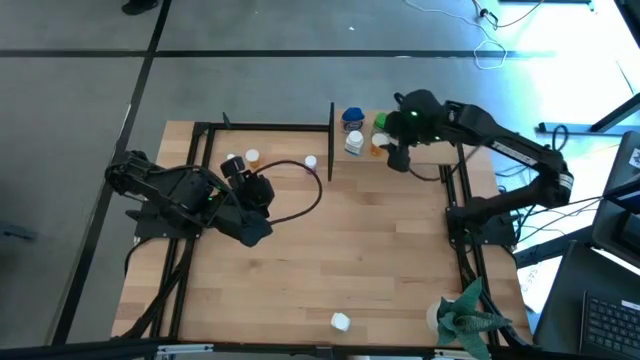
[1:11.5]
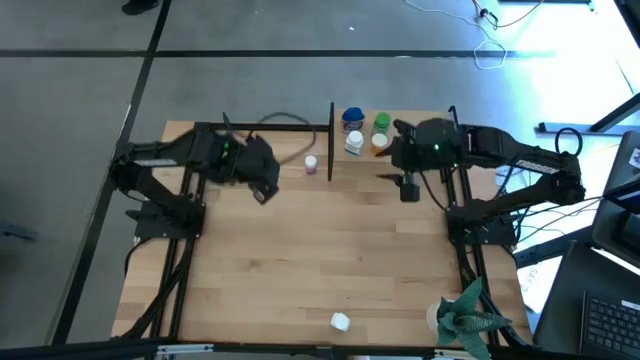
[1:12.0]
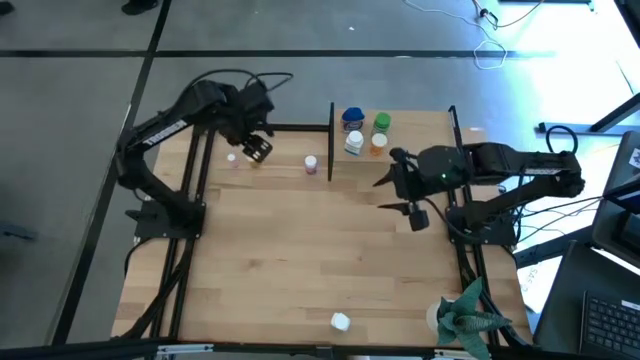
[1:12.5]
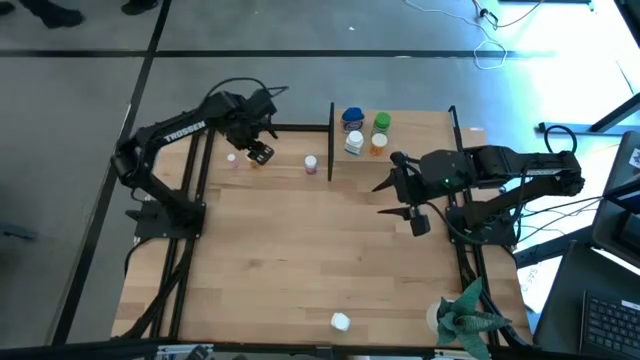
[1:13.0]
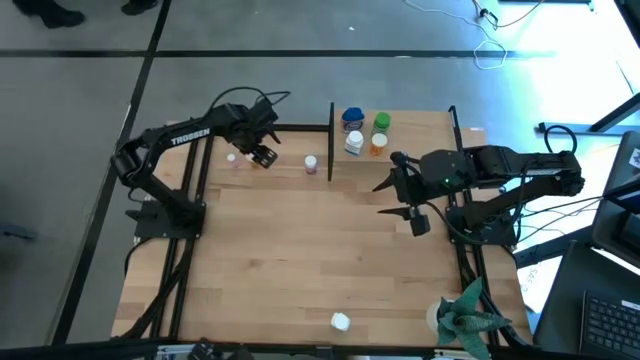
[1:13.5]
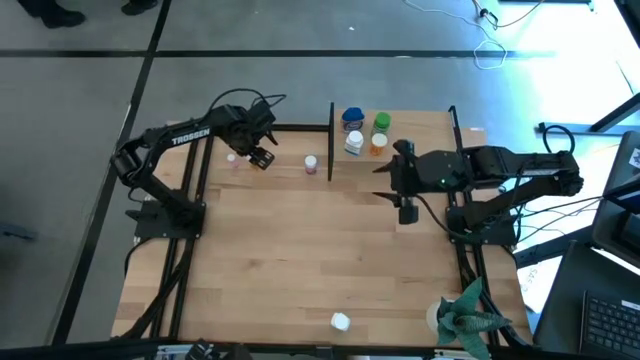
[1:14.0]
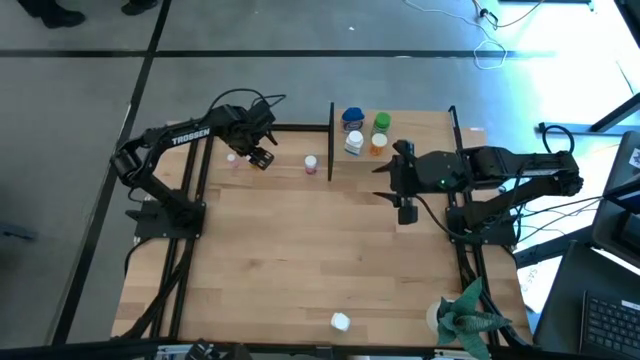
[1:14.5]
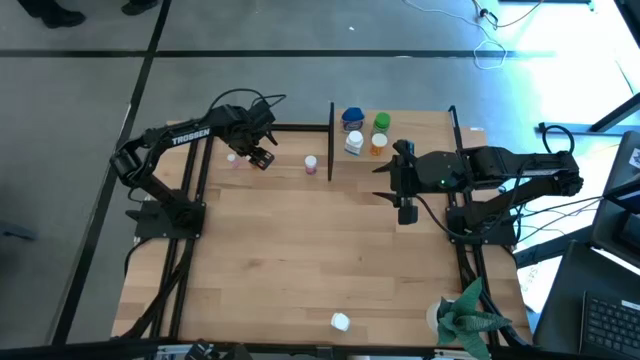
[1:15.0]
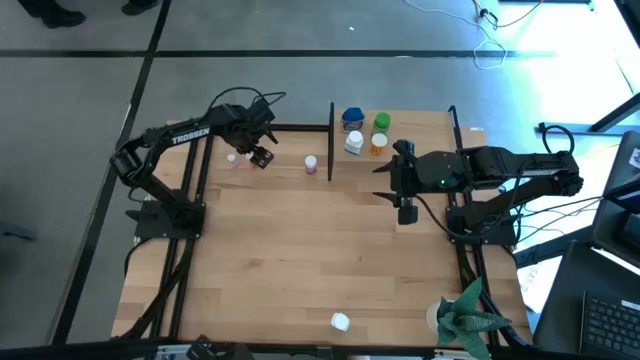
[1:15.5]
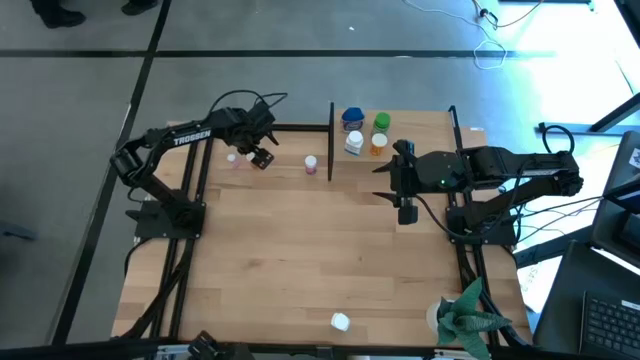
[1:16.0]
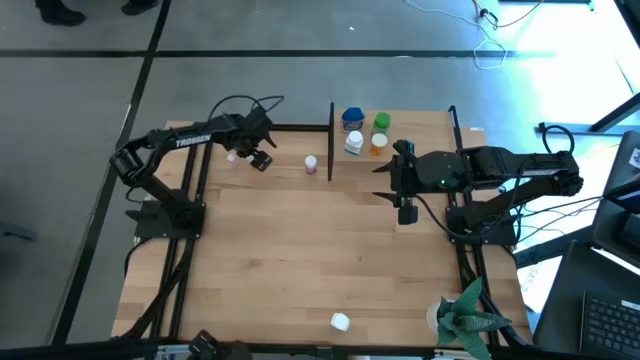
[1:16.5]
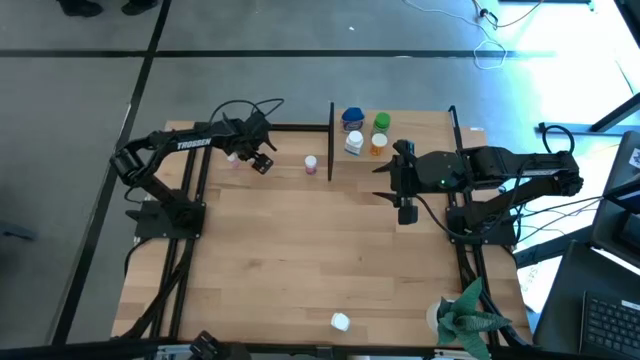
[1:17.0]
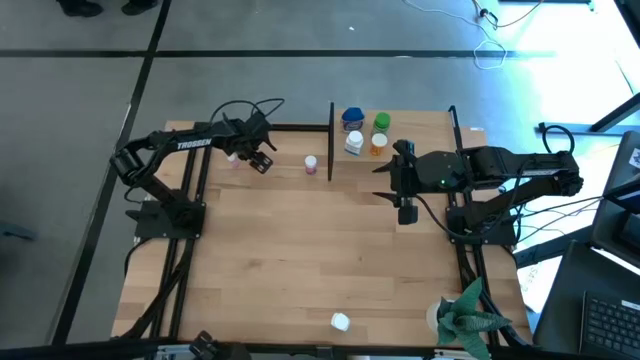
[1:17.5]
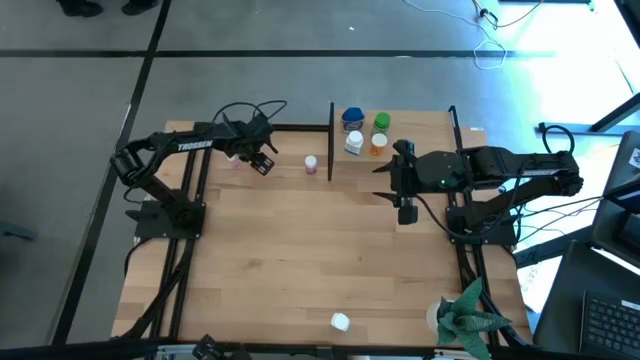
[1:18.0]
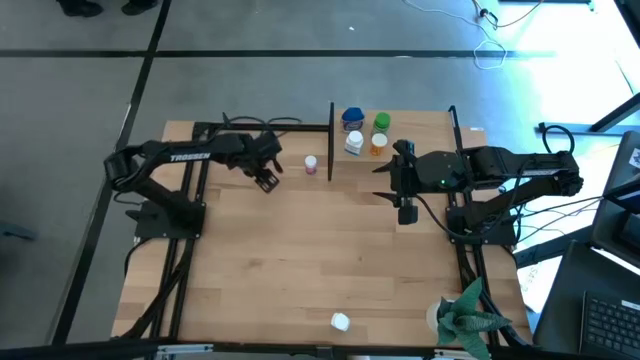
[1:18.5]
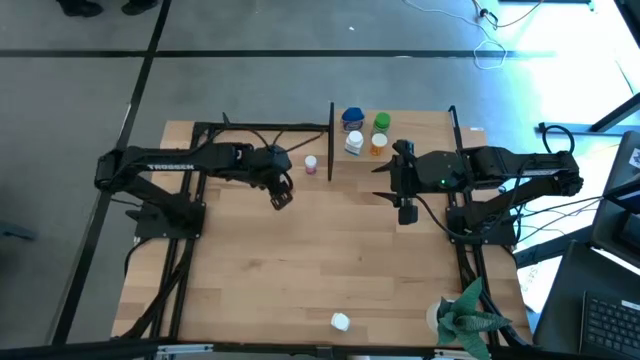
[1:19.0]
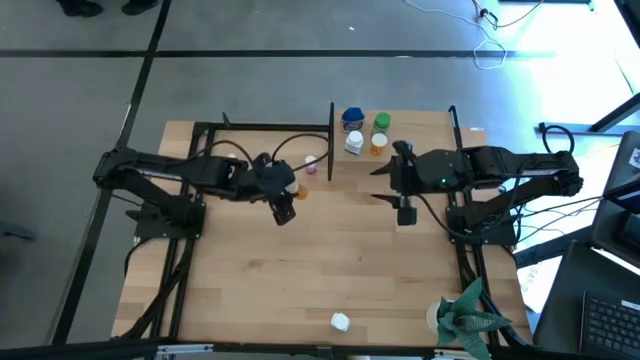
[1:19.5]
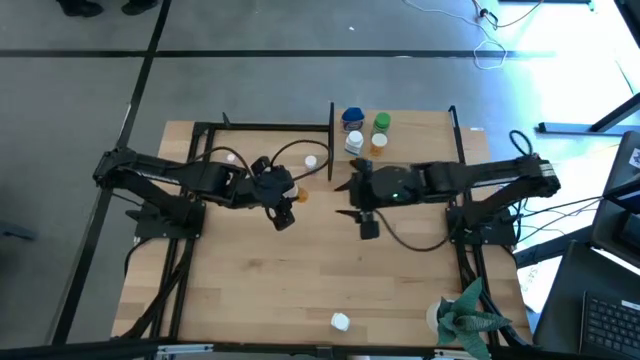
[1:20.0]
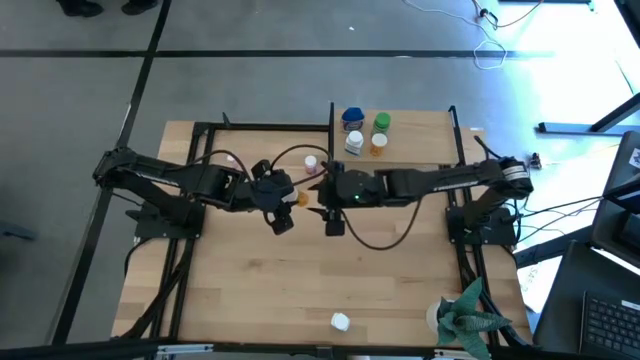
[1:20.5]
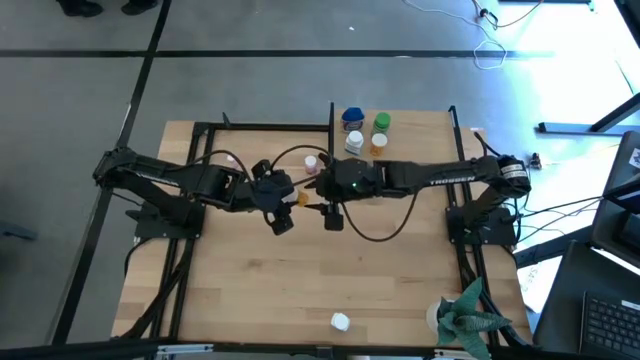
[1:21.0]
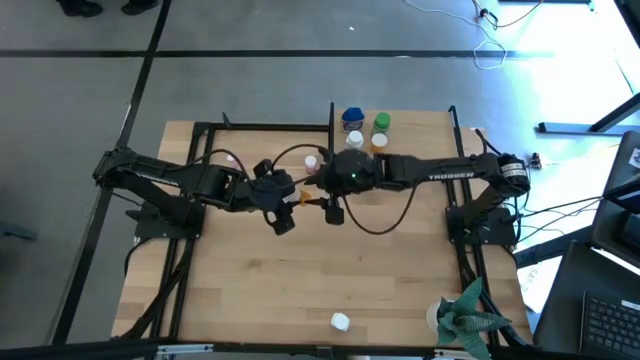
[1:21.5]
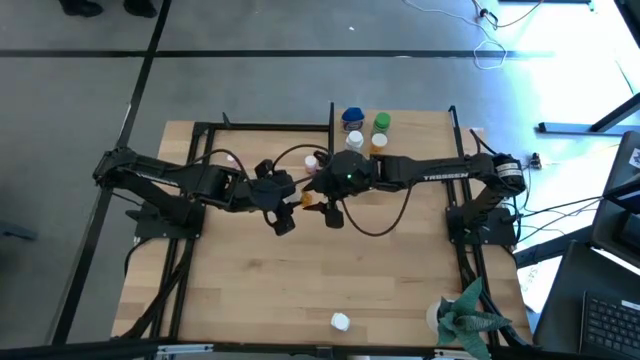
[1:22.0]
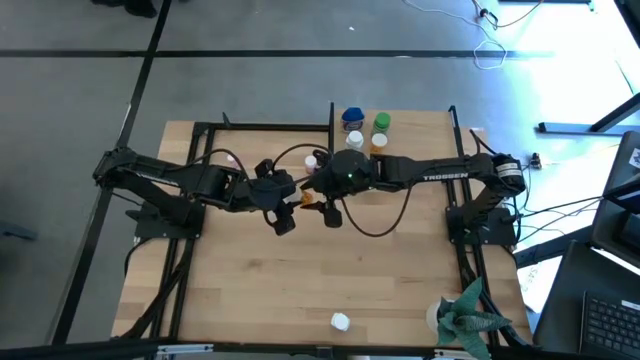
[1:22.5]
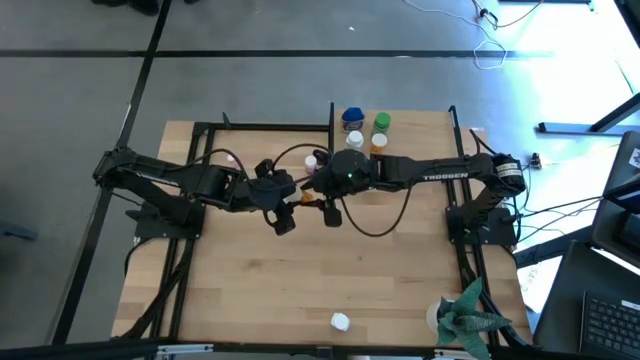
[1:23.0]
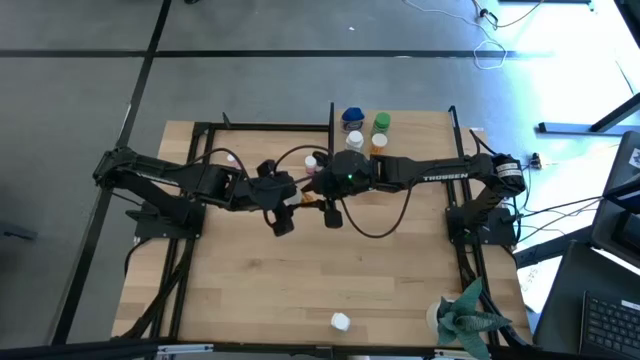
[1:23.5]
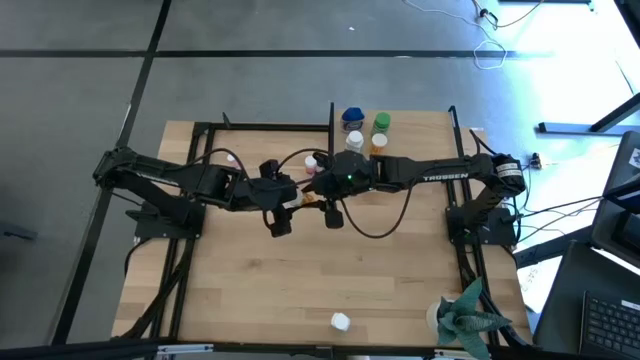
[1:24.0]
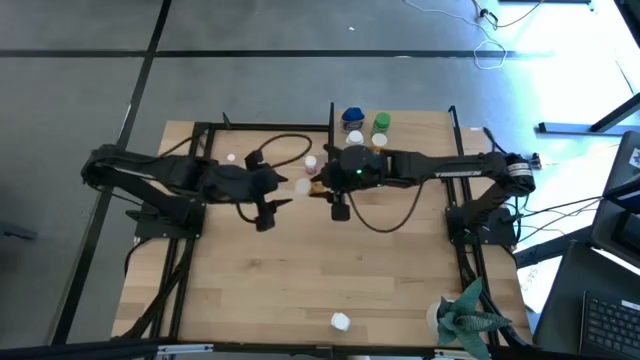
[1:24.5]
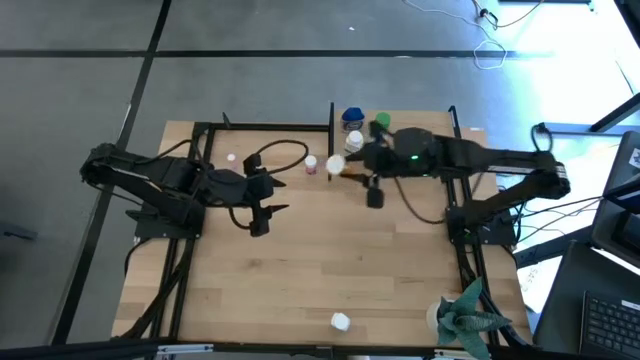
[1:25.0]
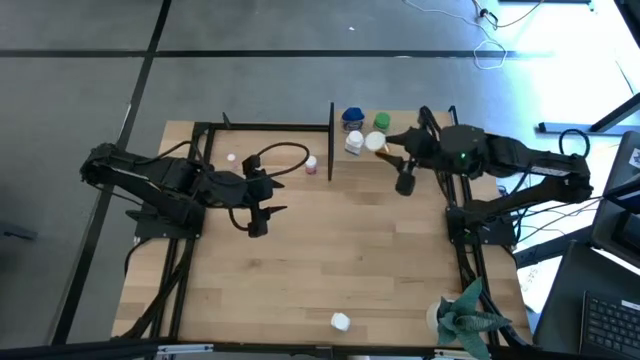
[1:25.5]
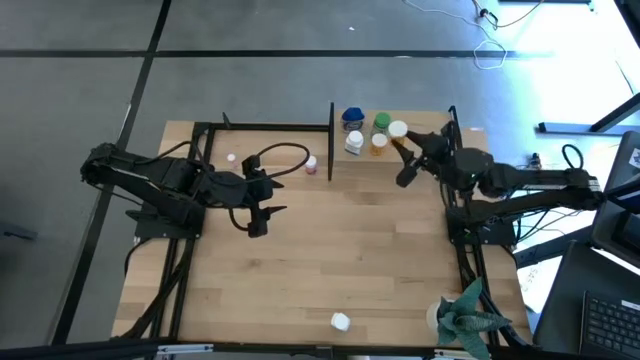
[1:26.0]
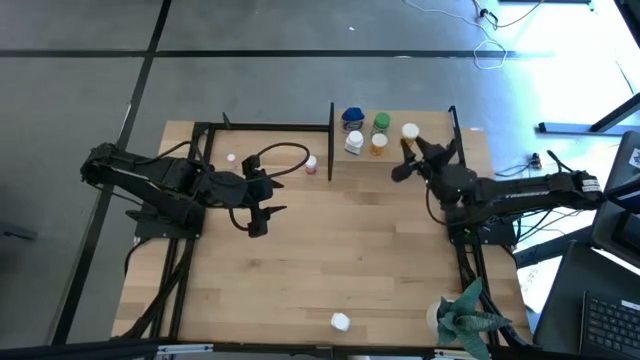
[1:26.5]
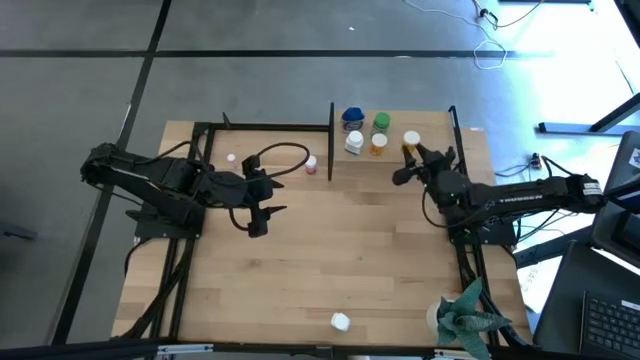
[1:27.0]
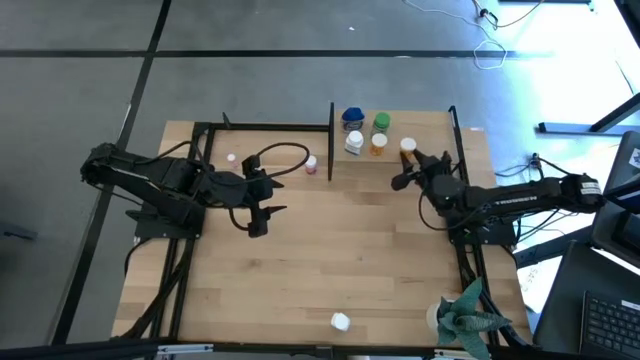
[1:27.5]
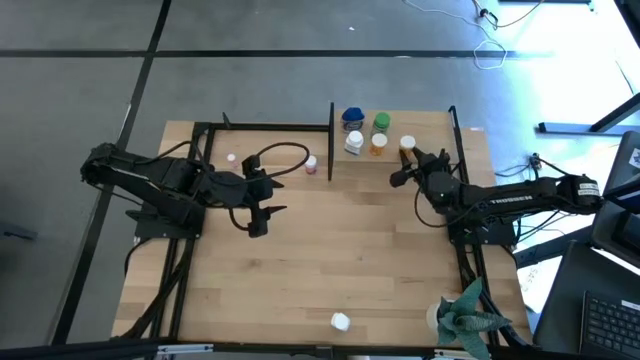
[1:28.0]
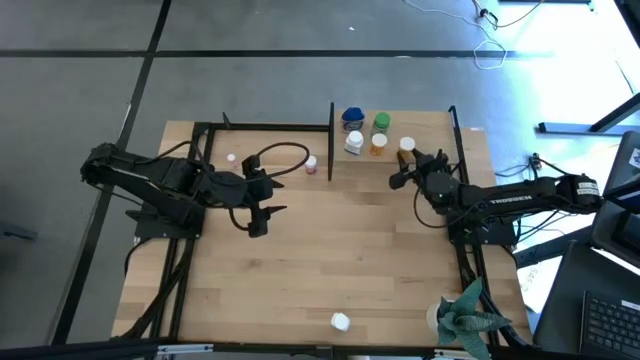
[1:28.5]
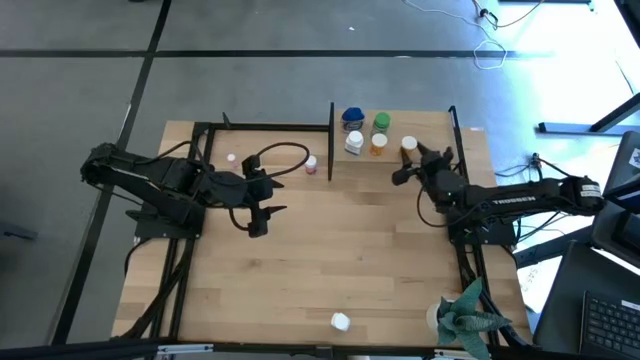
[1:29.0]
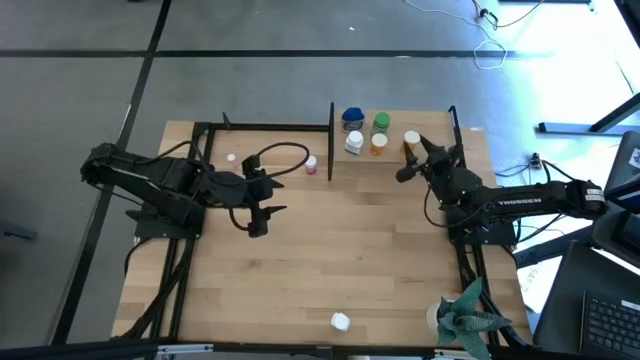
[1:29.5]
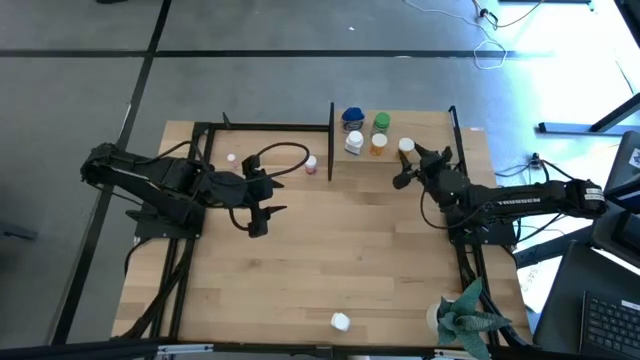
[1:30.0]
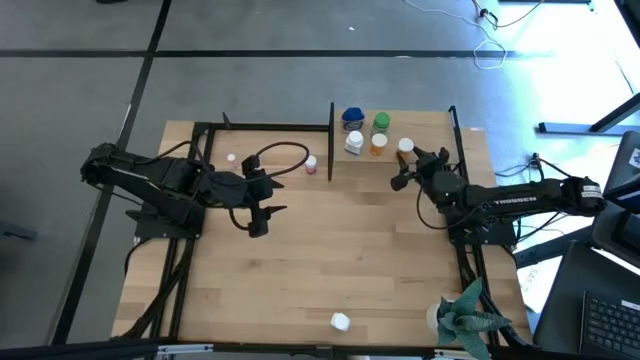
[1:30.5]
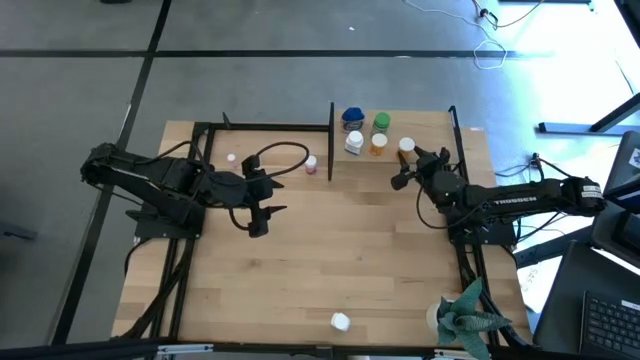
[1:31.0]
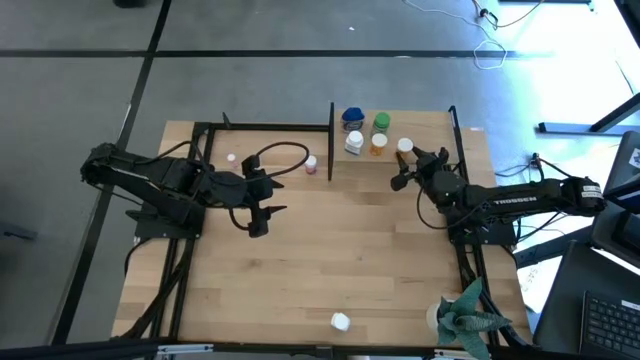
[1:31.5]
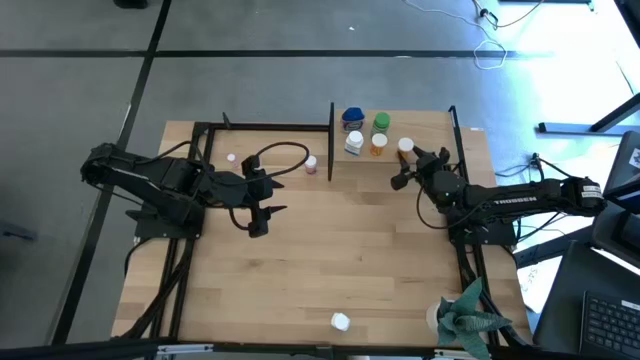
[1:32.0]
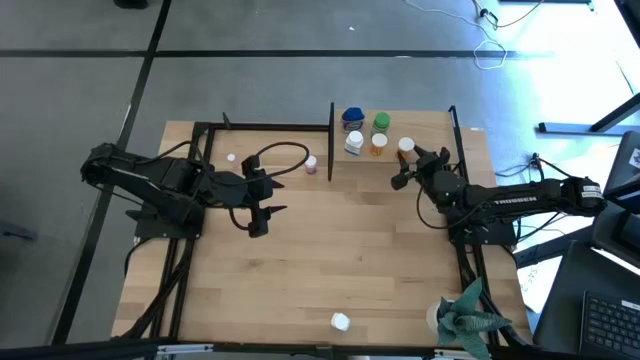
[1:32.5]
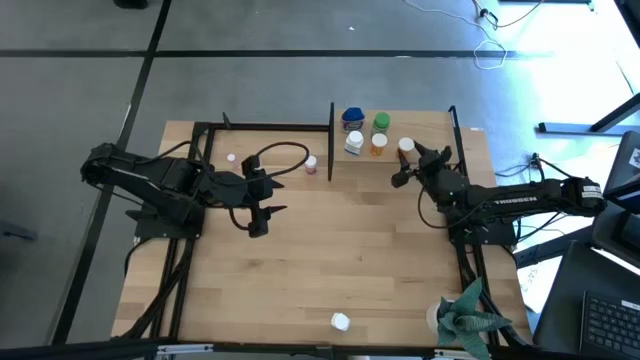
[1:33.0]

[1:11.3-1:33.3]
Task: Pick and place medicine bottles onto shelf by color
Put the orange medicine bottle on the shelf
